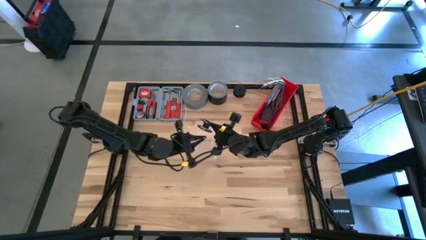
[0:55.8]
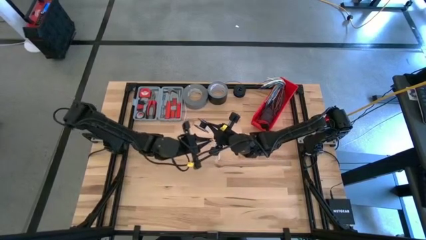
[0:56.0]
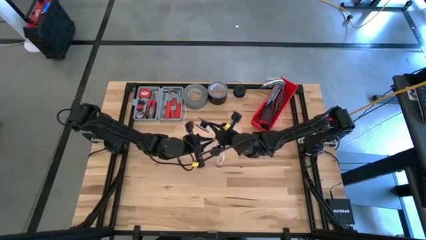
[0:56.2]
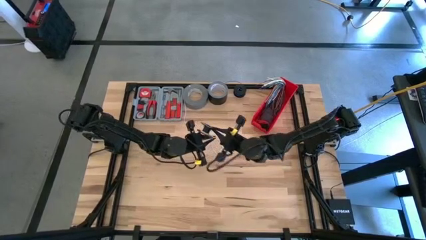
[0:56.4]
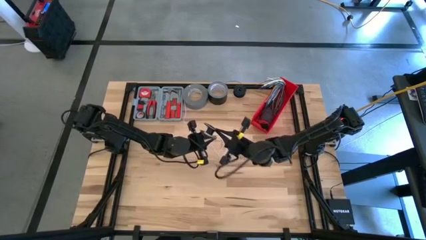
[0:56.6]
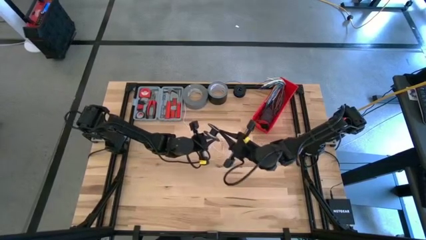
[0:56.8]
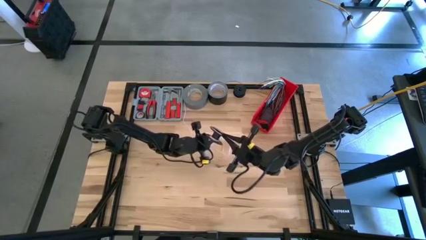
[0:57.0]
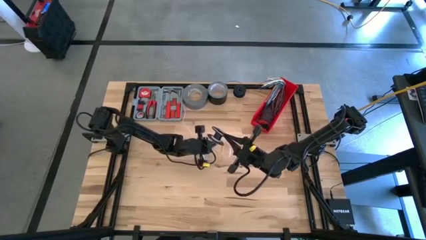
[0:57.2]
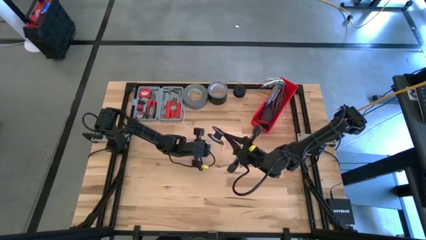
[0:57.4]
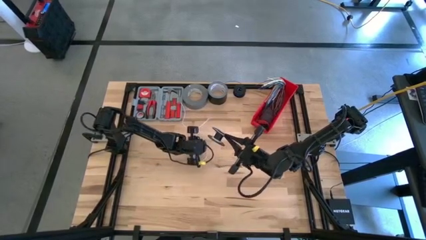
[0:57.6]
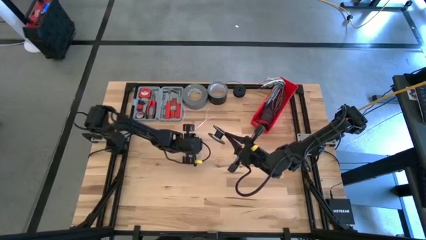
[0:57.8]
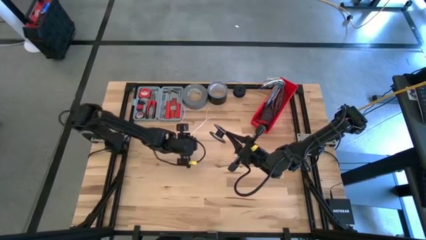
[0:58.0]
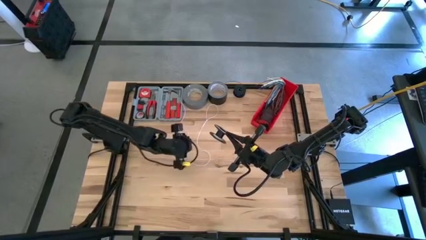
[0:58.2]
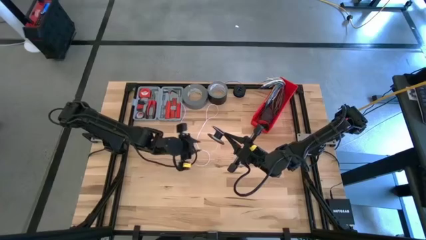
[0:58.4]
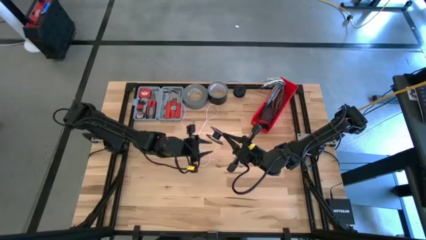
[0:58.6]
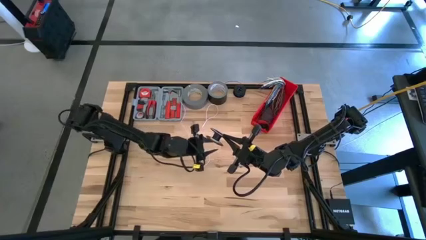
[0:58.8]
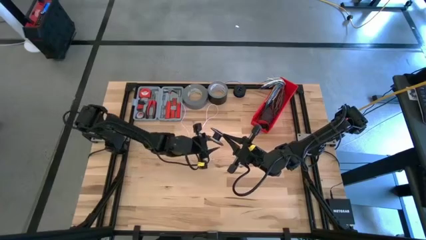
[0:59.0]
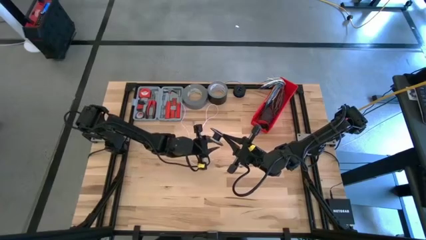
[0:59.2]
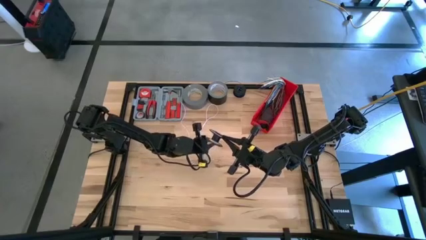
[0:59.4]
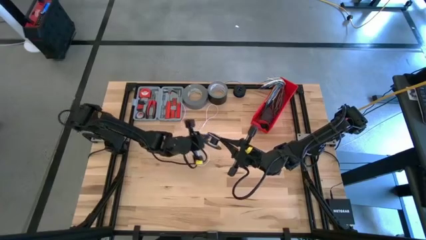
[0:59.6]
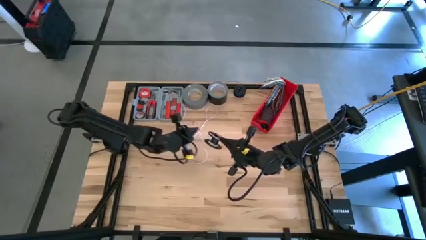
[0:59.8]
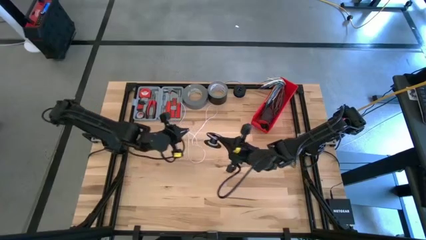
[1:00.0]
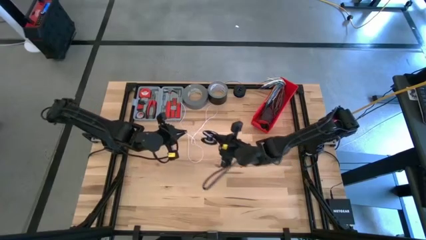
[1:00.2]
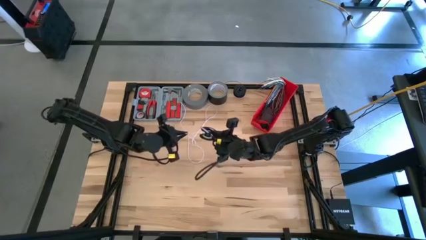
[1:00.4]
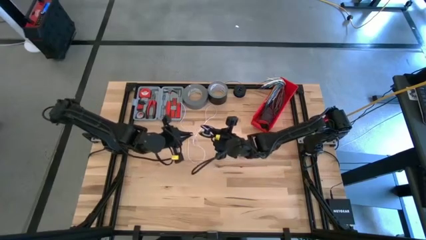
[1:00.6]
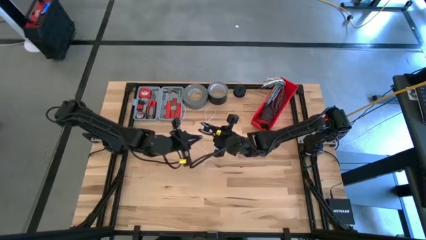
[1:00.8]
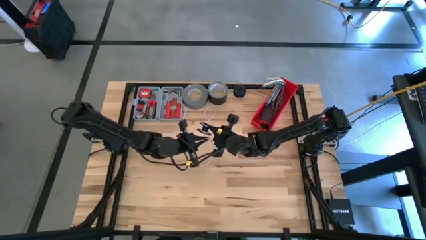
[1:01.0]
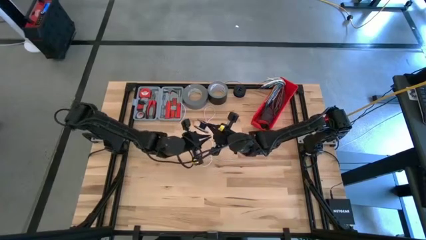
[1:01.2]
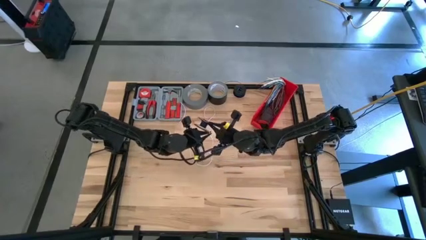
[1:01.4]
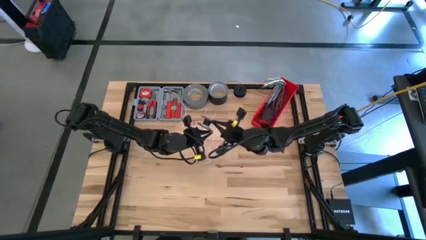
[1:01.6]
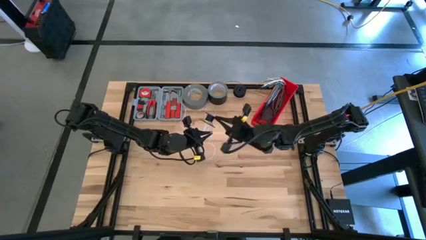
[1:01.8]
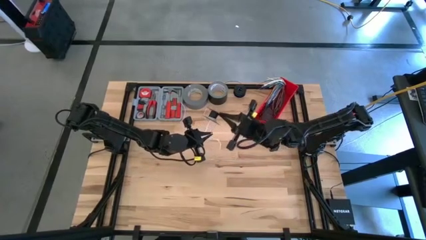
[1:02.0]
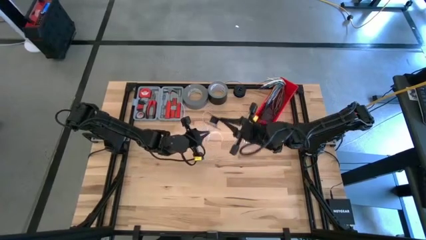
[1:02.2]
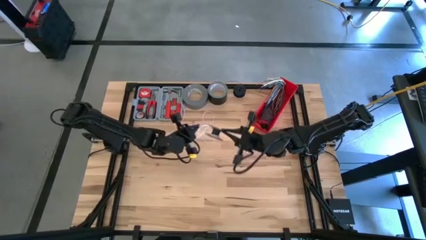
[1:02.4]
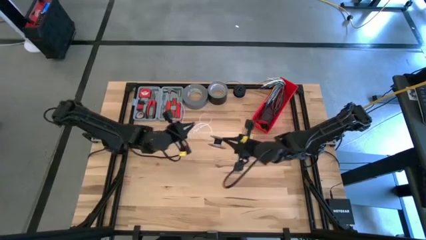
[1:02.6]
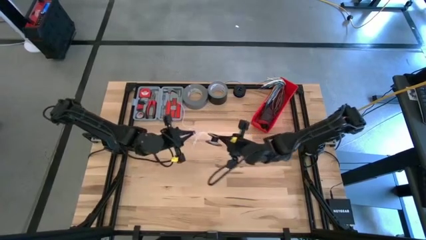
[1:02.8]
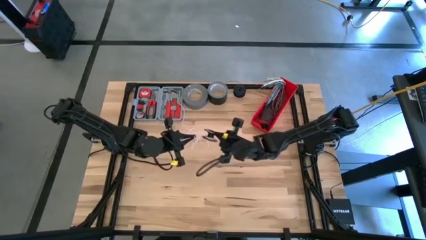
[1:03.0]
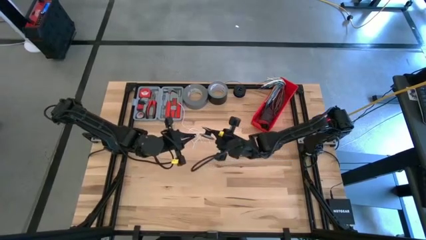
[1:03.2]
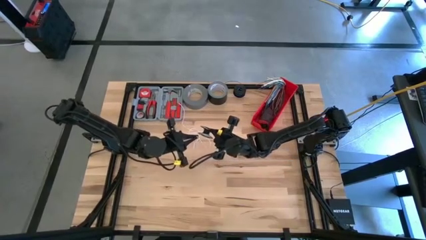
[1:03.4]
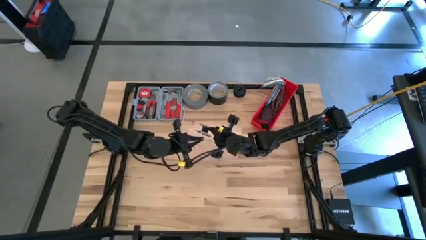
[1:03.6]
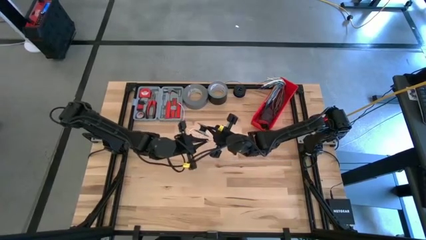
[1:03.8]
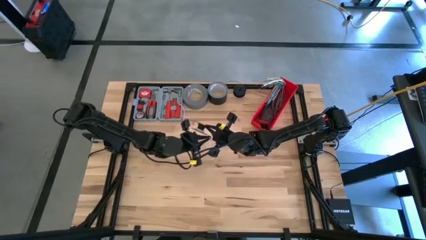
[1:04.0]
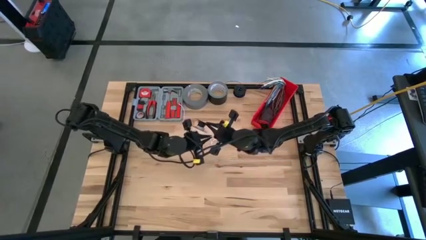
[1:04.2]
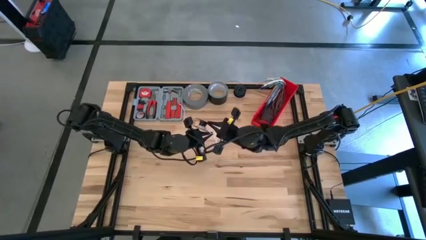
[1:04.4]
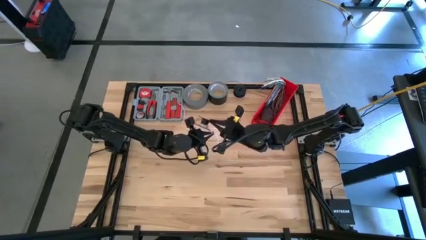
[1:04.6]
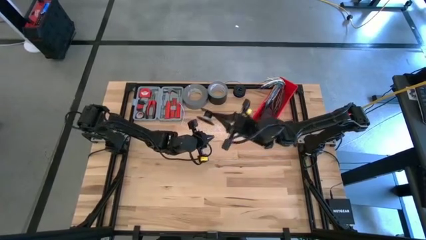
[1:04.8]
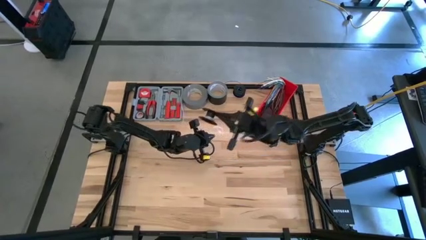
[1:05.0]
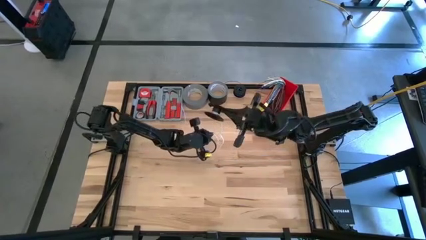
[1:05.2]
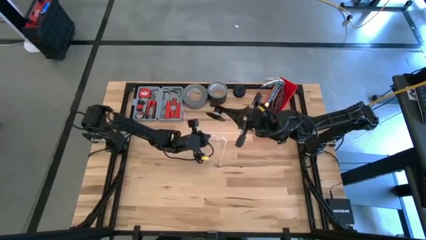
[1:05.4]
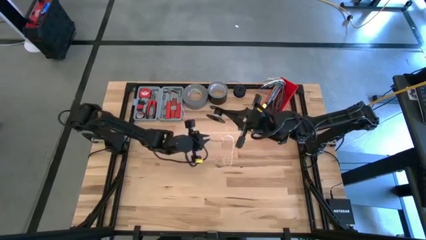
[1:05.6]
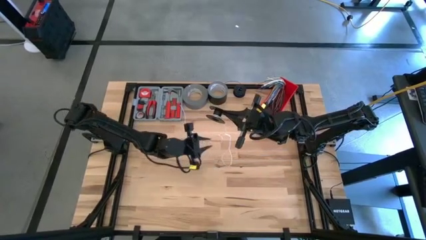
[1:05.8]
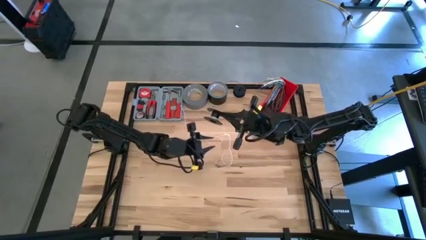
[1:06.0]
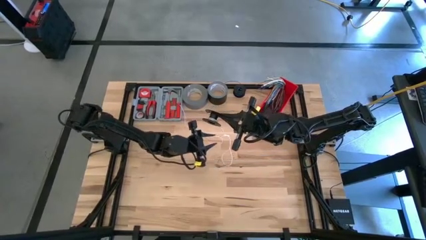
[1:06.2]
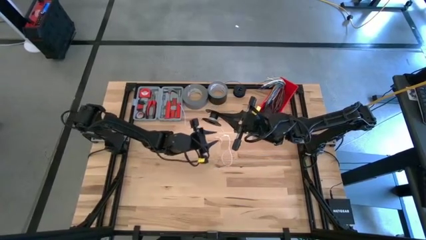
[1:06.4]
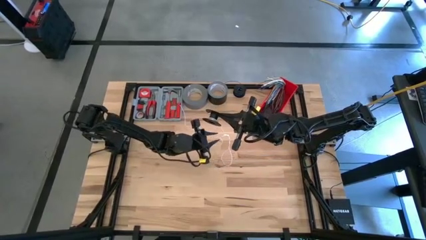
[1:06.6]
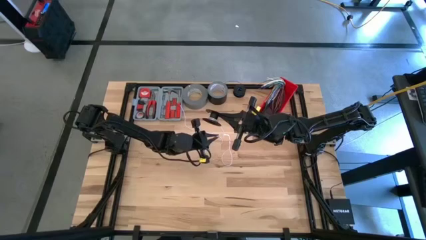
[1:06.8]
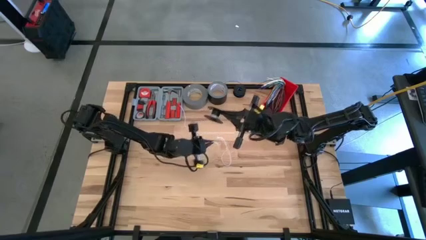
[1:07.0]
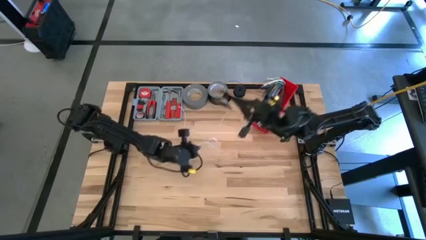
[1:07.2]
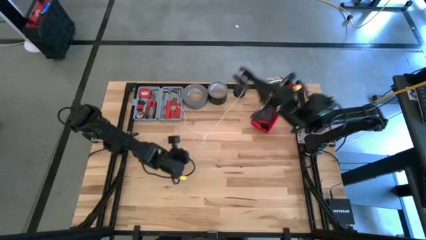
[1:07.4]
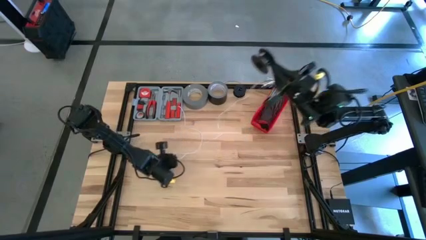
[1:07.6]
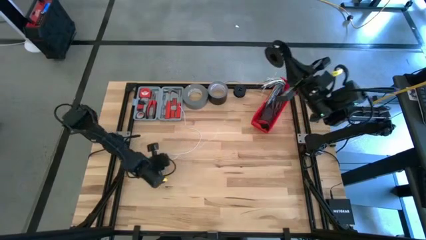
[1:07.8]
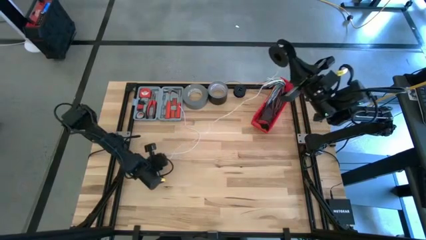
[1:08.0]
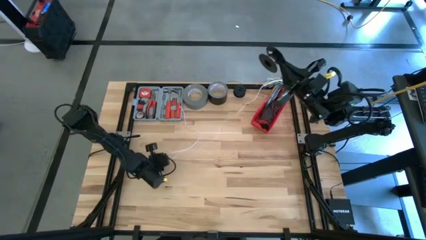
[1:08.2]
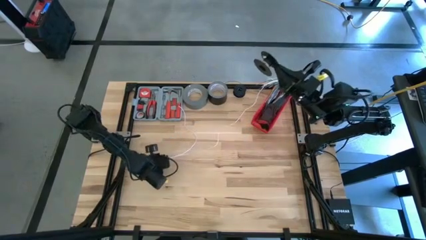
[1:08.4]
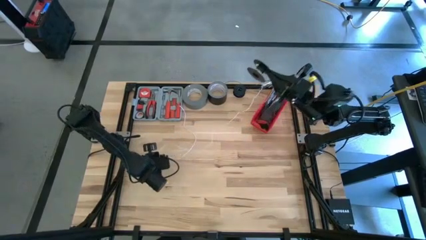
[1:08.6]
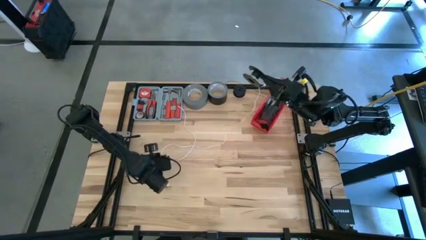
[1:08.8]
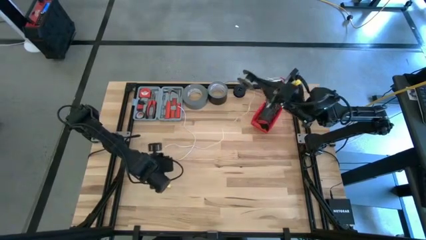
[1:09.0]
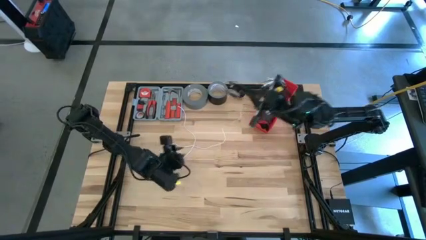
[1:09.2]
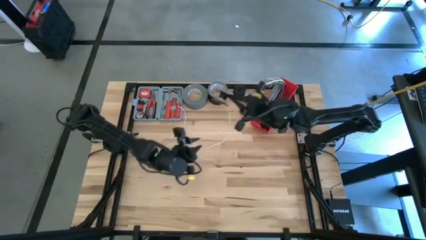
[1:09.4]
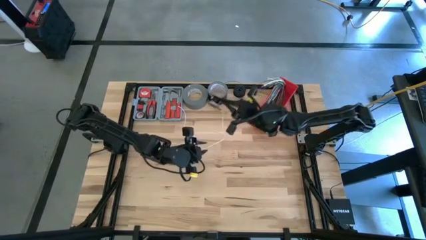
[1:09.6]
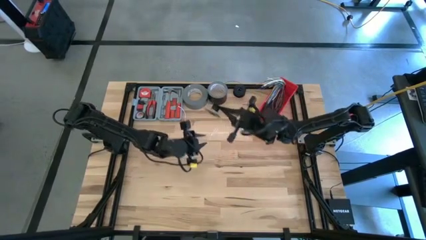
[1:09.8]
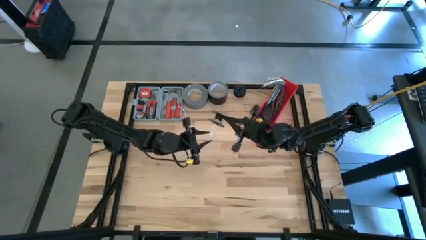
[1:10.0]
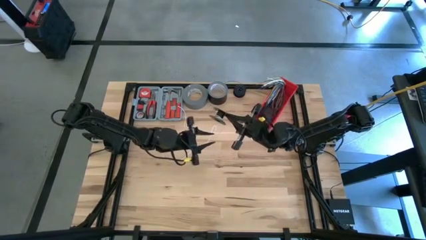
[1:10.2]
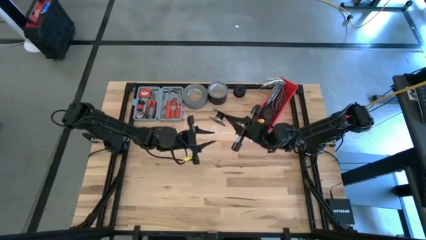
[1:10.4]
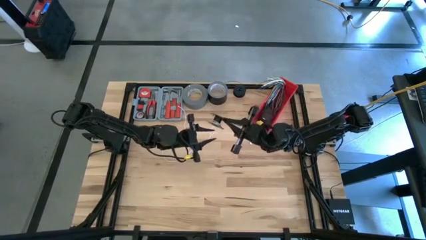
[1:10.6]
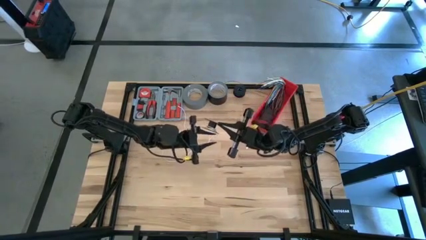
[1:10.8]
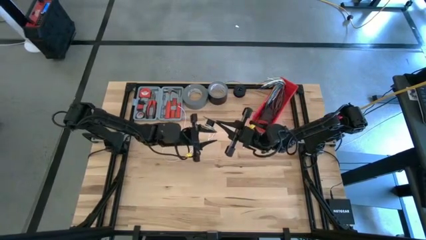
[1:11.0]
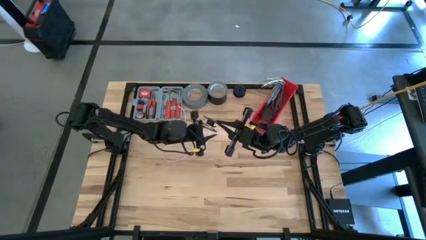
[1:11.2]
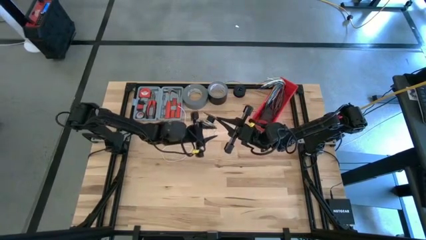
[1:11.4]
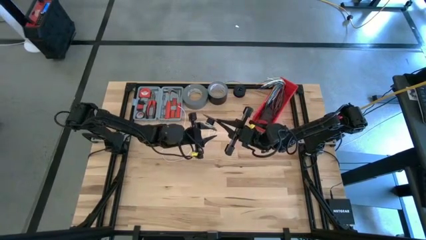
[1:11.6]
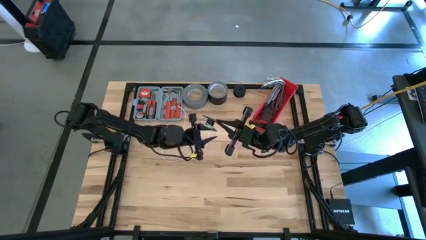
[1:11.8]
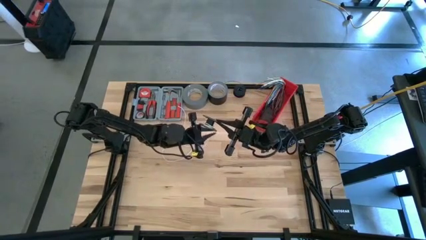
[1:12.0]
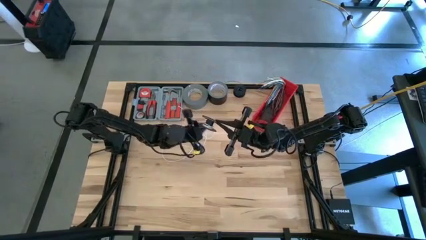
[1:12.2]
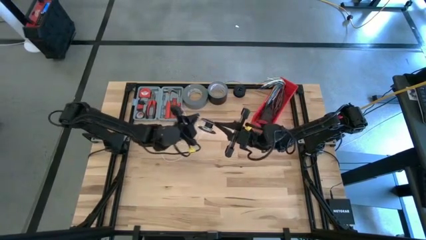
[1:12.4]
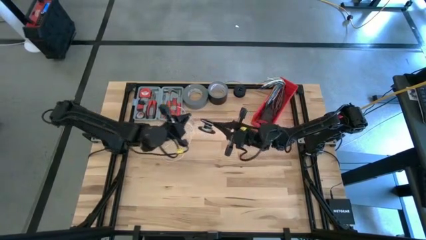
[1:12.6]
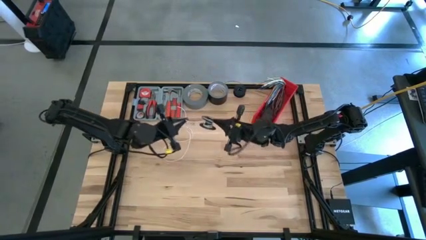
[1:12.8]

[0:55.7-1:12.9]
Task: Coil cords
Coil the white wire onto the black spool
